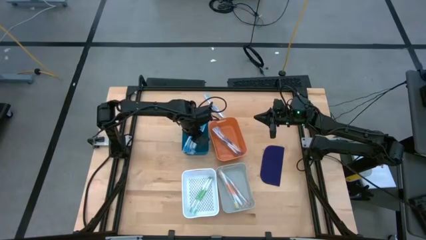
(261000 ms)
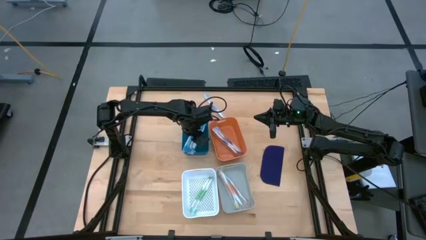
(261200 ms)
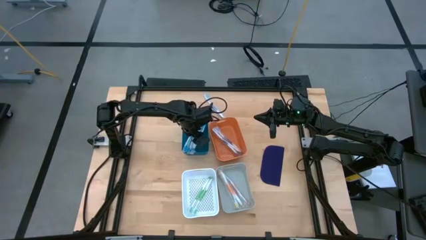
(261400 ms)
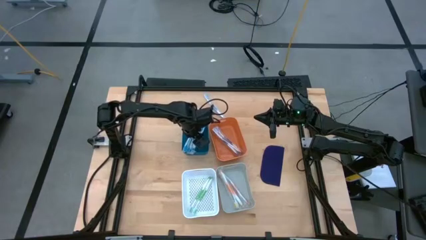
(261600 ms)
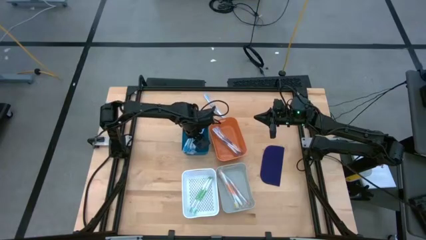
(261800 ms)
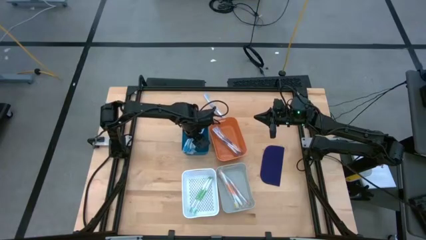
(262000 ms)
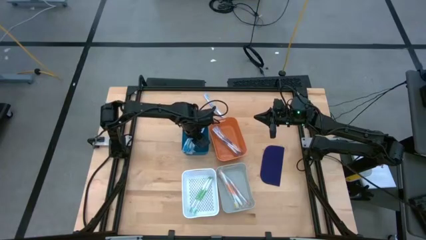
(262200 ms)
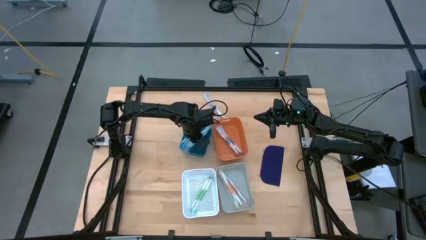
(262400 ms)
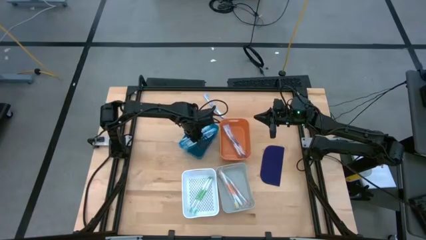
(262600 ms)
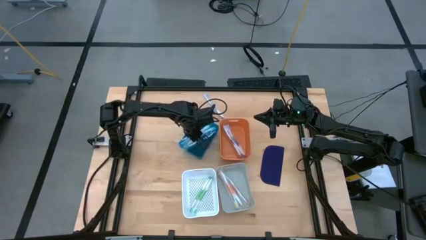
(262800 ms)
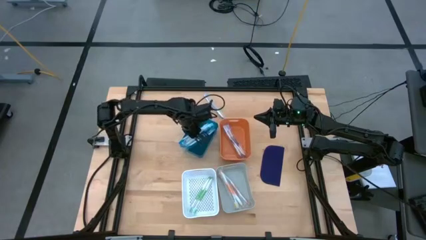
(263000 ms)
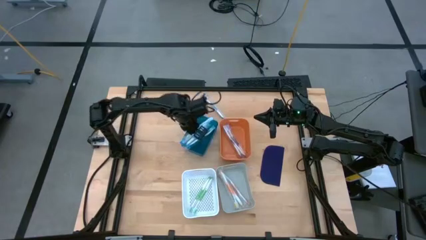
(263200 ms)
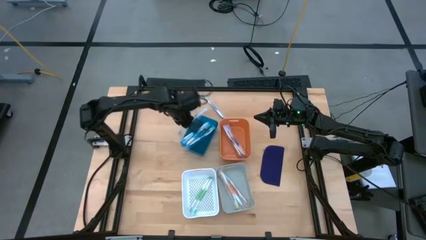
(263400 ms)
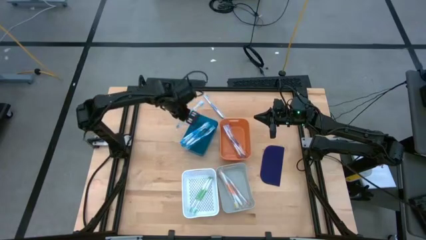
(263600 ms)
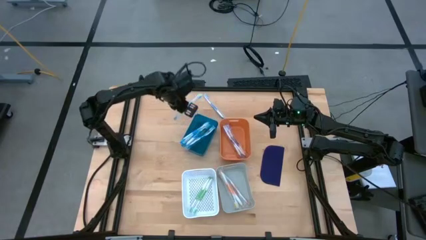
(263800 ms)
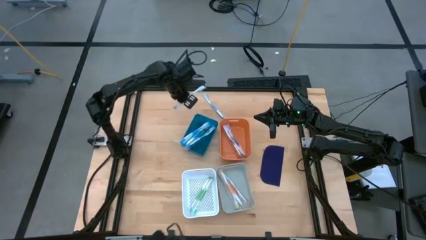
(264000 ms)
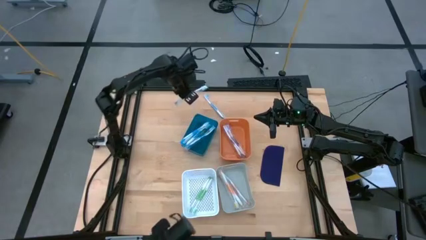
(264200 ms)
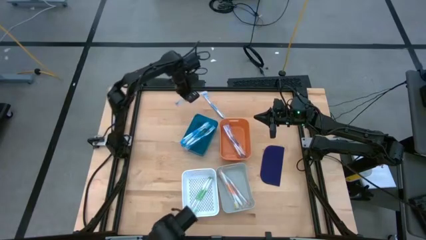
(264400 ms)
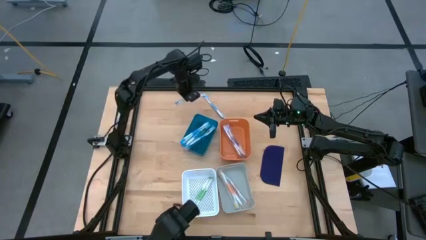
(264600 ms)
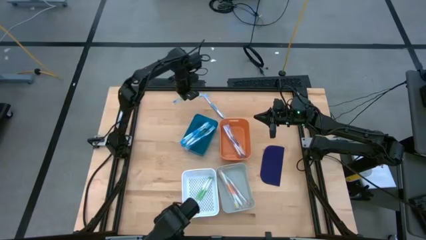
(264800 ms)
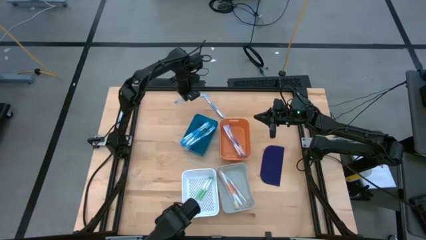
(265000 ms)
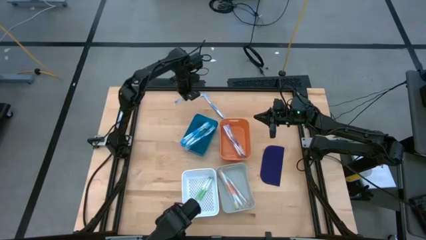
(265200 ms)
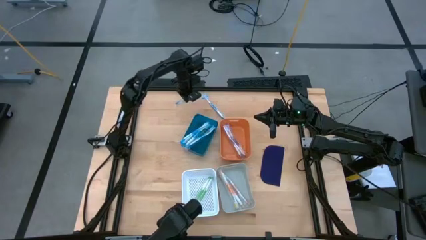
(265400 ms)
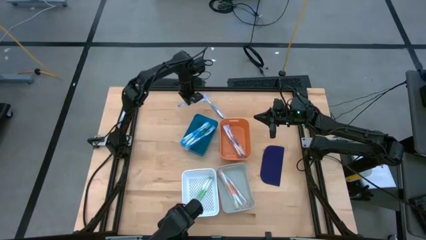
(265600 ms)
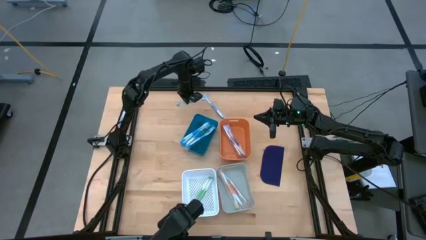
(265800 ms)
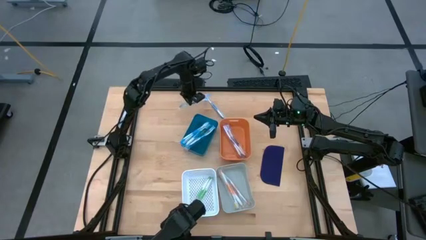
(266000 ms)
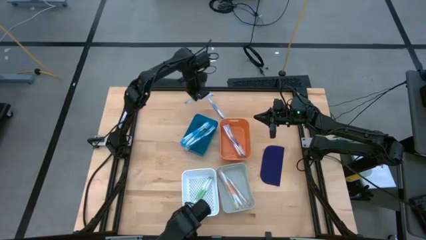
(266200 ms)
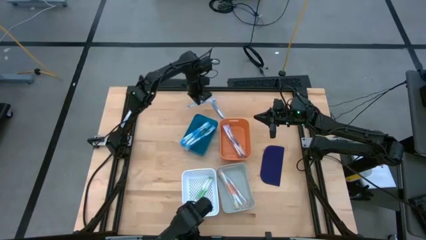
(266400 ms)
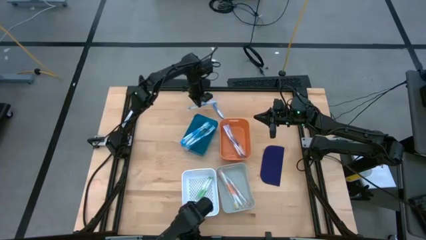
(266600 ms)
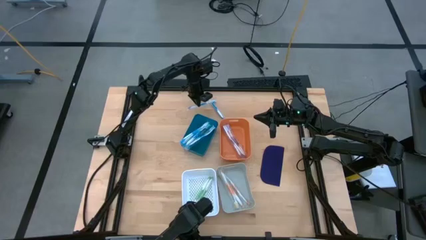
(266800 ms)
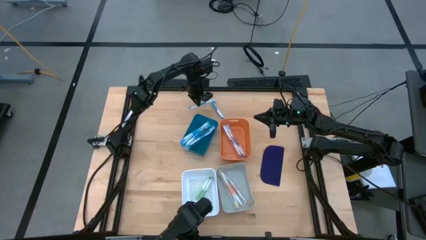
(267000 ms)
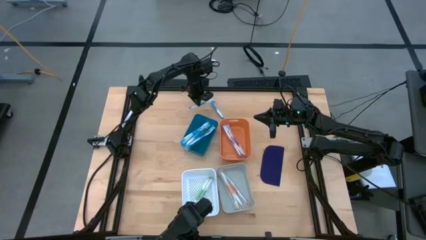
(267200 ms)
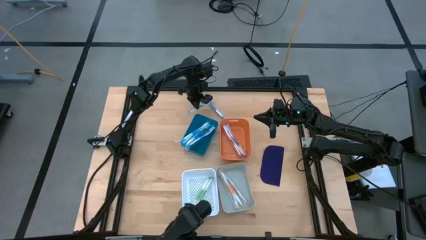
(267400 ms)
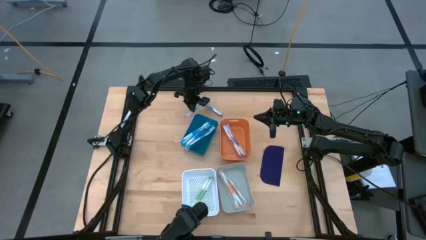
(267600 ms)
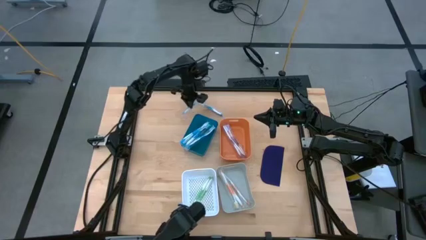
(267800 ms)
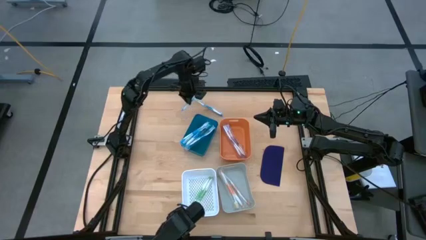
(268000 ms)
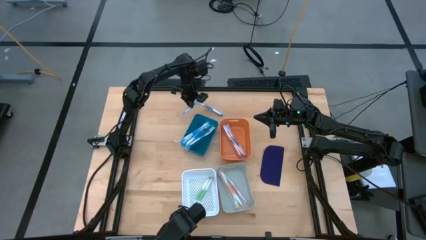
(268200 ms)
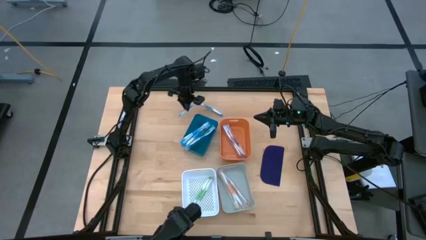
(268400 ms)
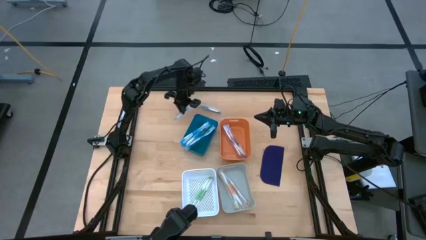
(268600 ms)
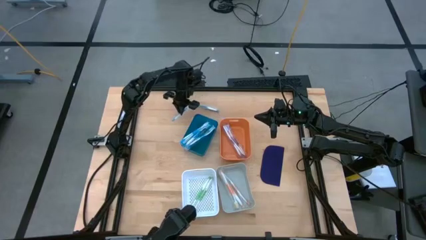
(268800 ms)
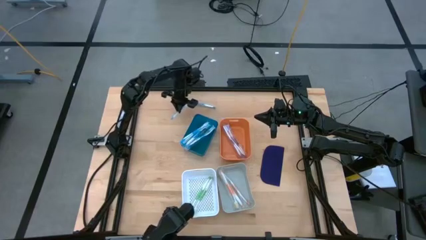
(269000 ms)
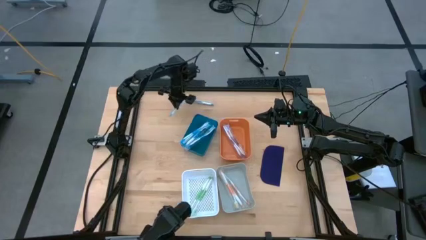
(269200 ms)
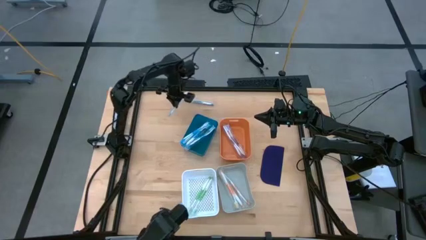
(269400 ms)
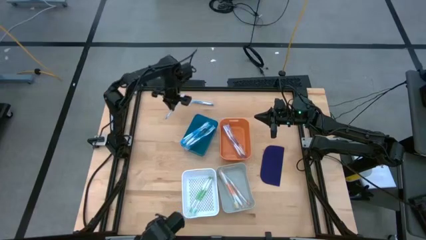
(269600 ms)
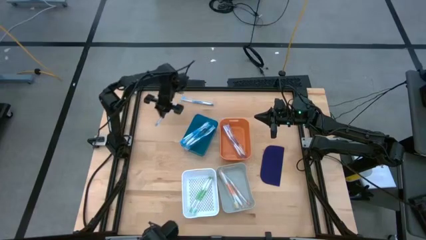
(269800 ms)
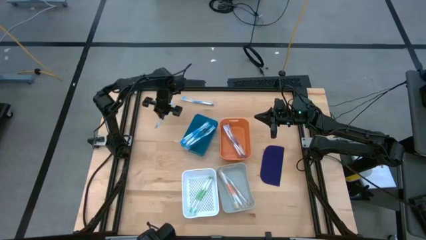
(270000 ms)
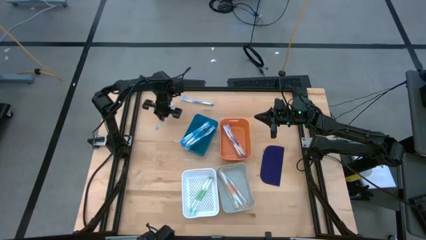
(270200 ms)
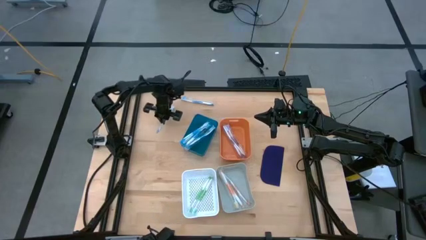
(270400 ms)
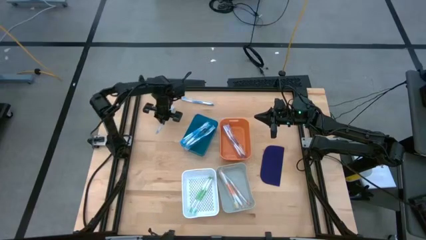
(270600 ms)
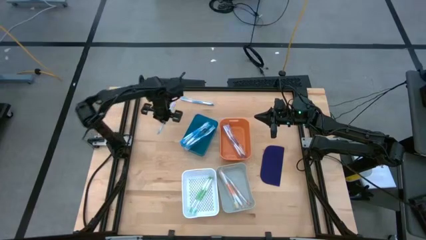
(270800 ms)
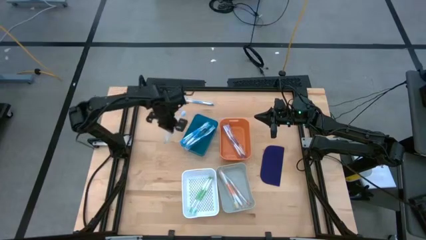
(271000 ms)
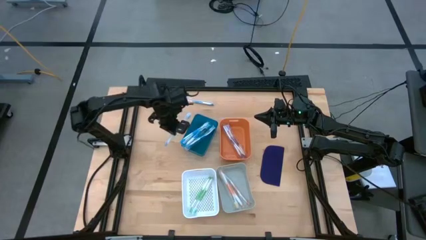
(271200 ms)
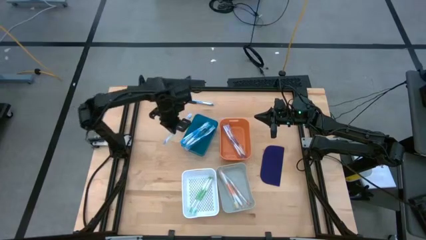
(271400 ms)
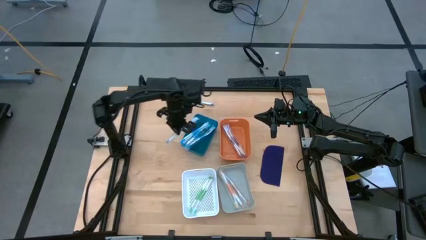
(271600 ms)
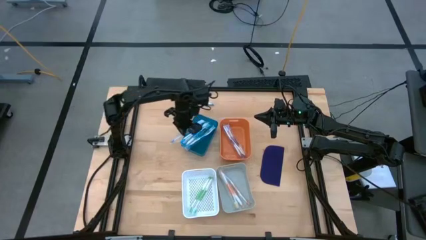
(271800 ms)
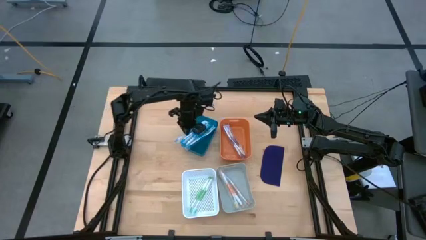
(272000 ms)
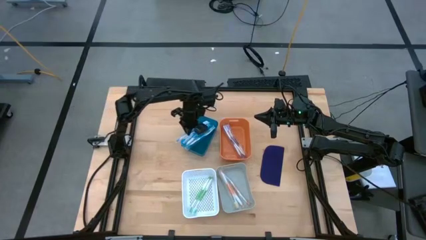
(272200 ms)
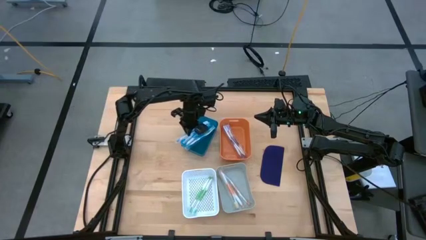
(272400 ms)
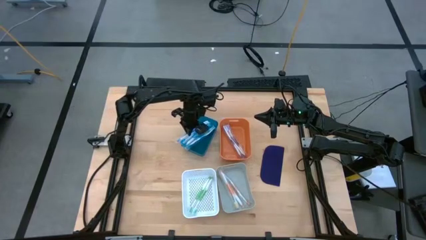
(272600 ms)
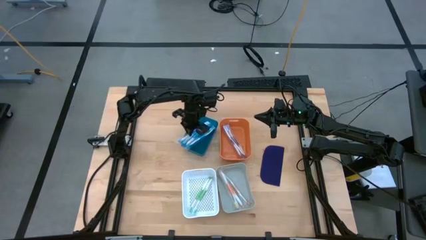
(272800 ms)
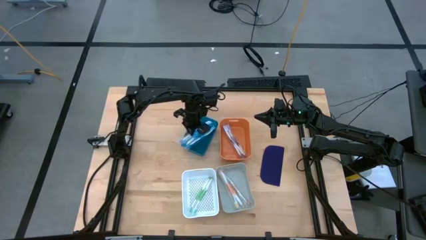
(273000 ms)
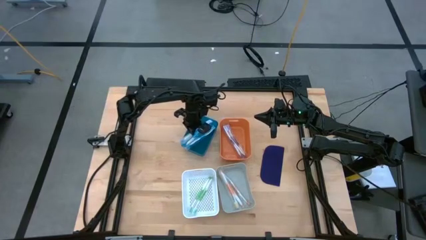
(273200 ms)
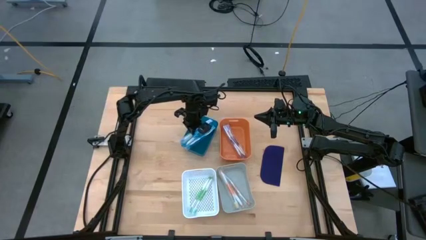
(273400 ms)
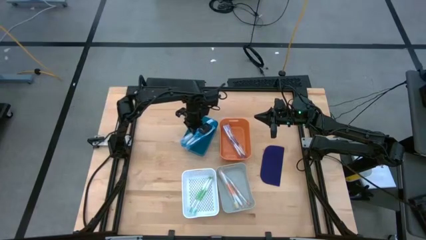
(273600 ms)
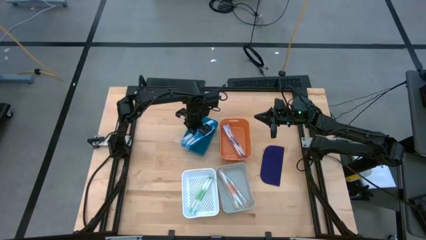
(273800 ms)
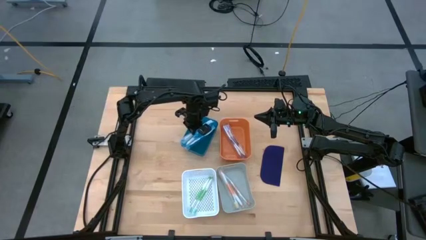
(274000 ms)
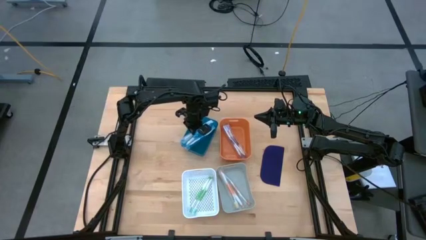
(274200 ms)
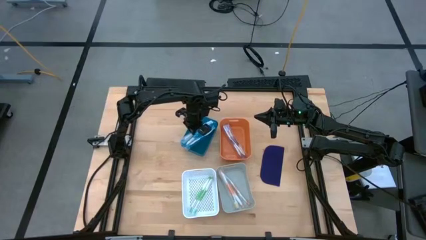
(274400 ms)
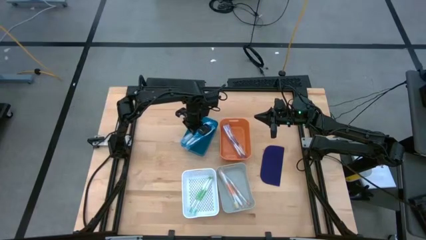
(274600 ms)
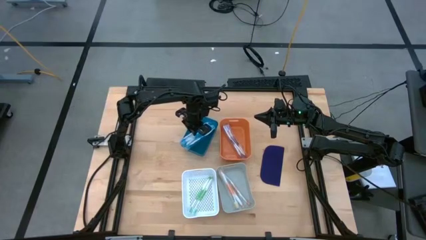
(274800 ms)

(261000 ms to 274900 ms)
Task: Pick & Place Toothbrushes
Adjust the blue toothbrush on the blue bin

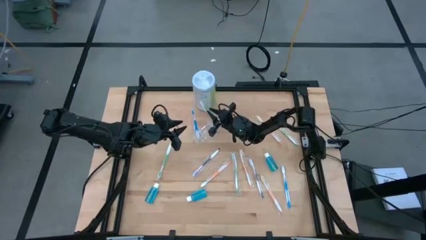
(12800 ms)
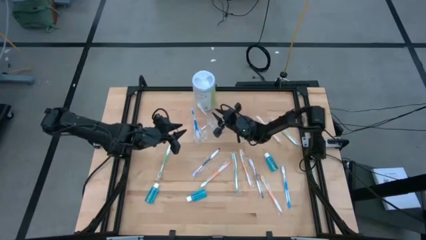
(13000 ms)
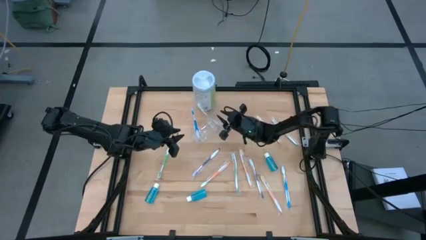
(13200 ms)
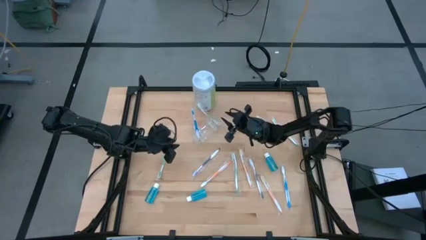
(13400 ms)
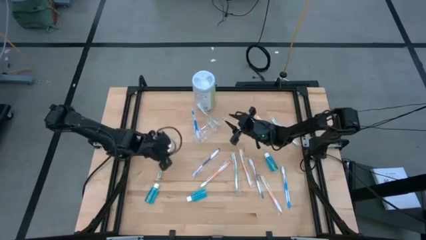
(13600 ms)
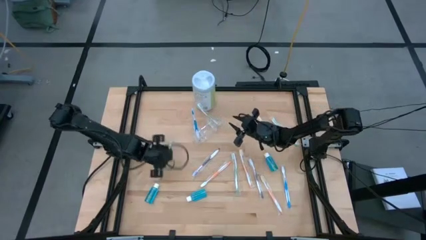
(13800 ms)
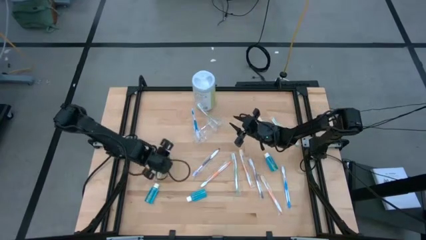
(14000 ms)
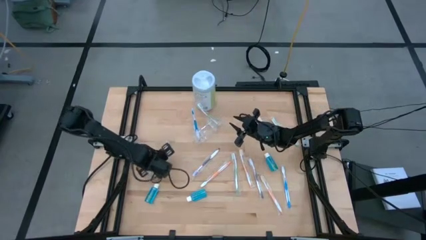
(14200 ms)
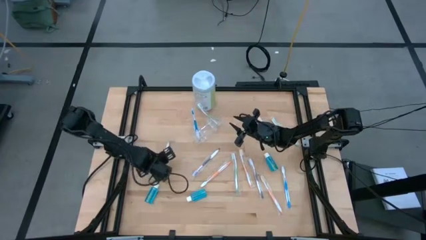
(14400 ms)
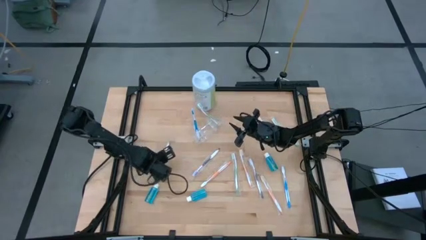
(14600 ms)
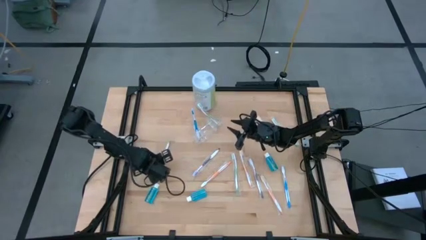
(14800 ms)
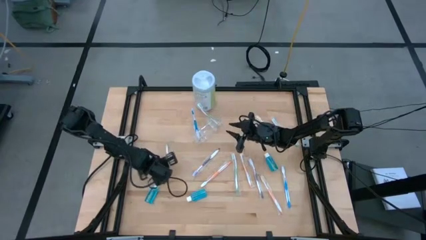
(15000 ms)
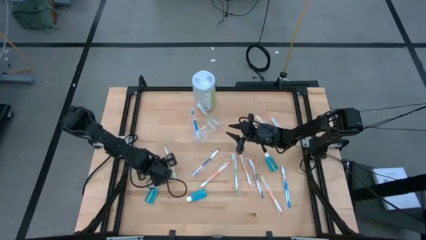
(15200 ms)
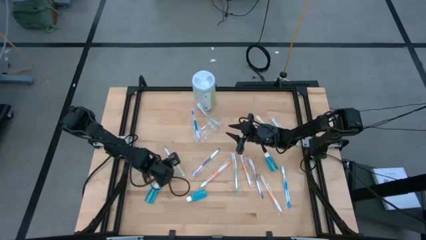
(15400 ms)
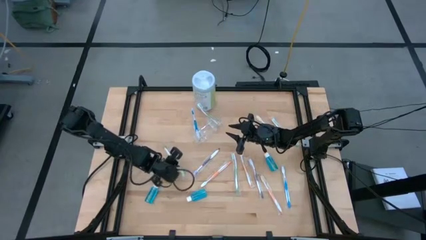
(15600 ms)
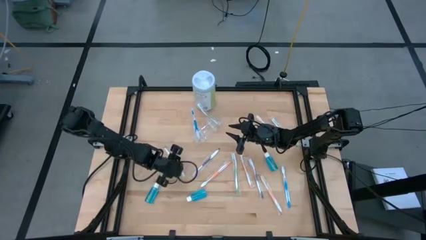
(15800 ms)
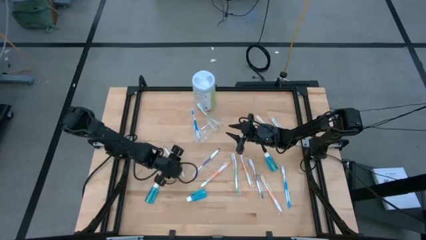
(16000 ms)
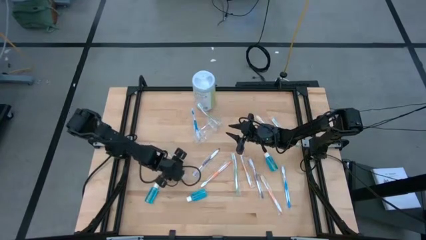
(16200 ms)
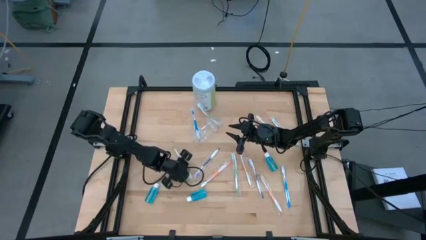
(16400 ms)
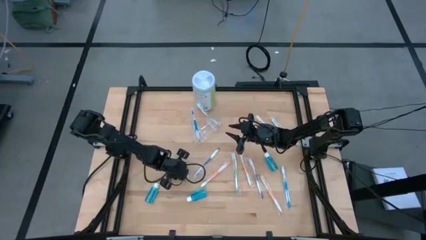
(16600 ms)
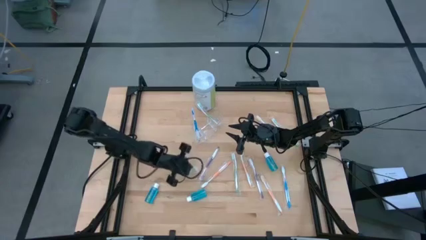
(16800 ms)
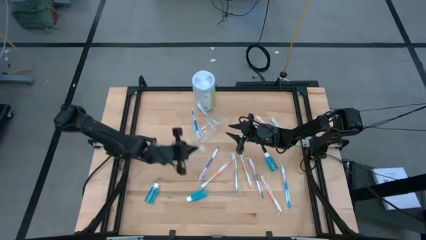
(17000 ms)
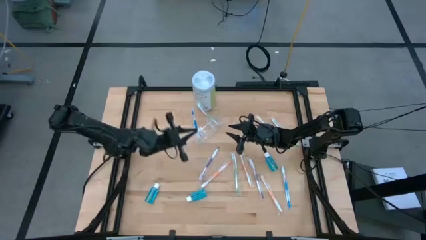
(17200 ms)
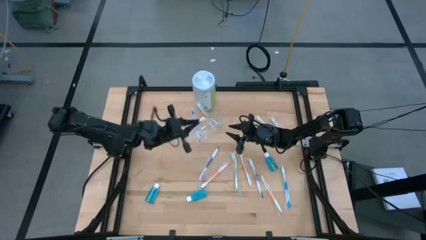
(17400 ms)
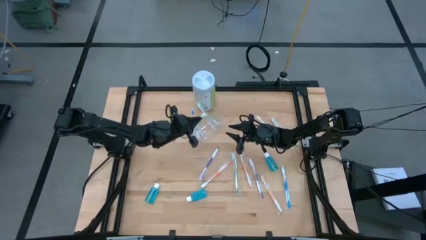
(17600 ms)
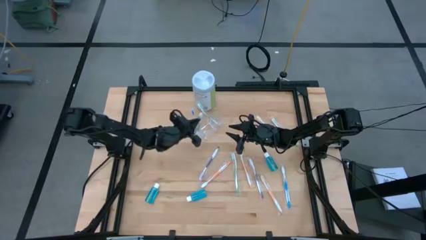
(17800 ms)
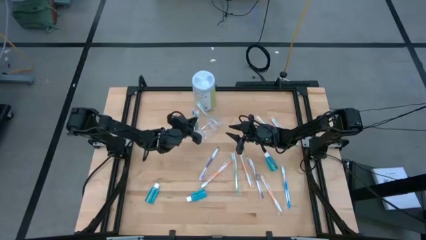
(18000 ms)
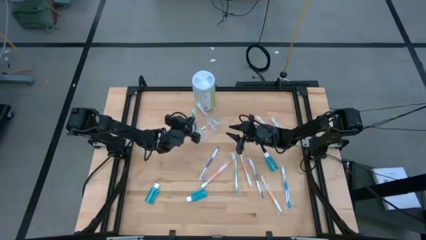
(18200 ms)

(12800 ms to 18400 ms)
Task: Pick & Place toothbrushing station
Put the green toothbrush into the transparent organizer
